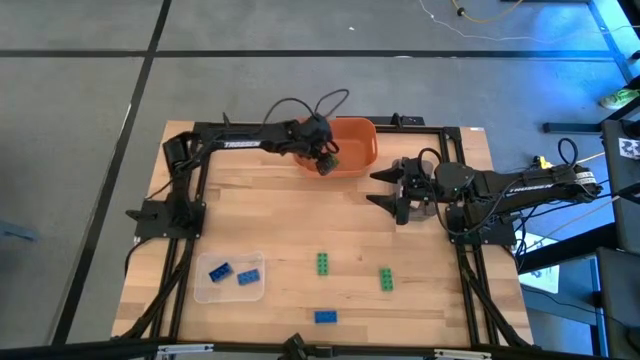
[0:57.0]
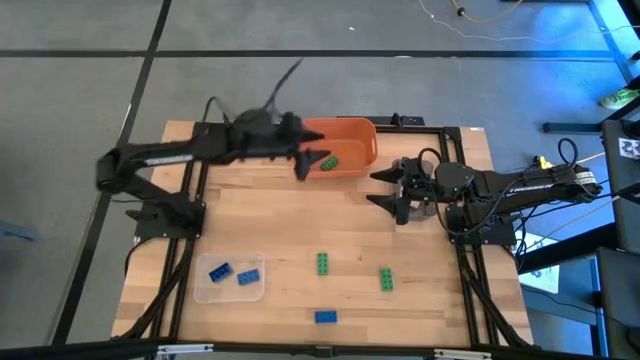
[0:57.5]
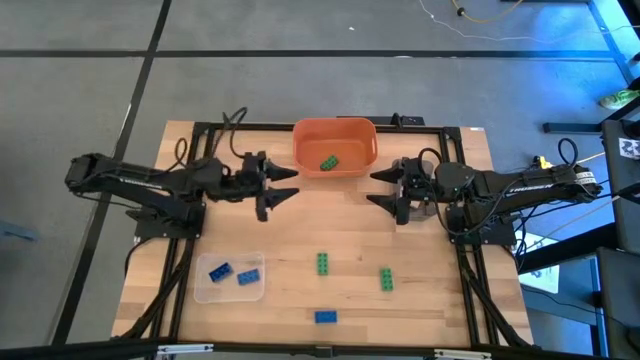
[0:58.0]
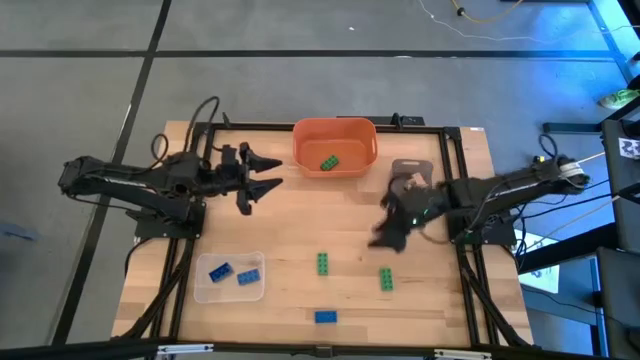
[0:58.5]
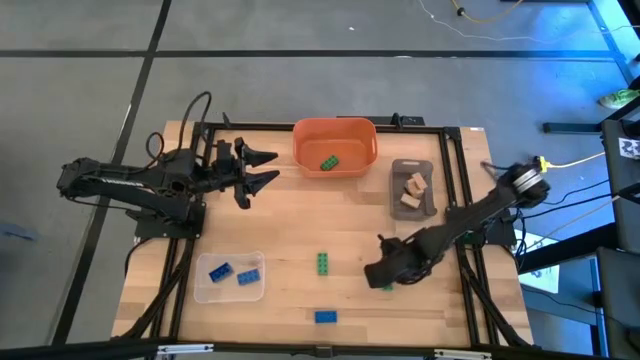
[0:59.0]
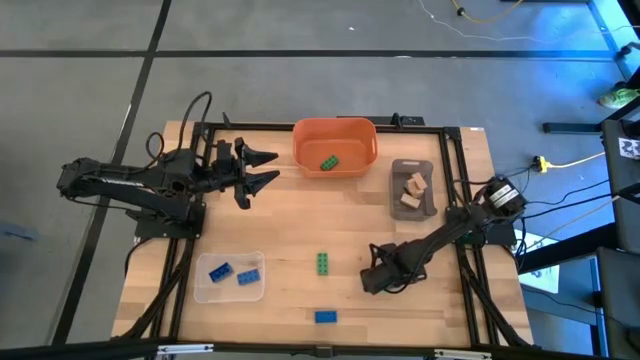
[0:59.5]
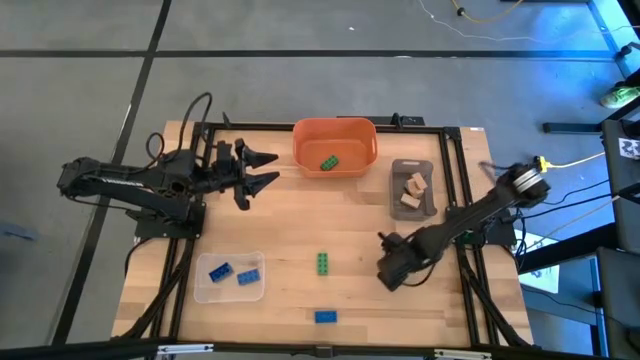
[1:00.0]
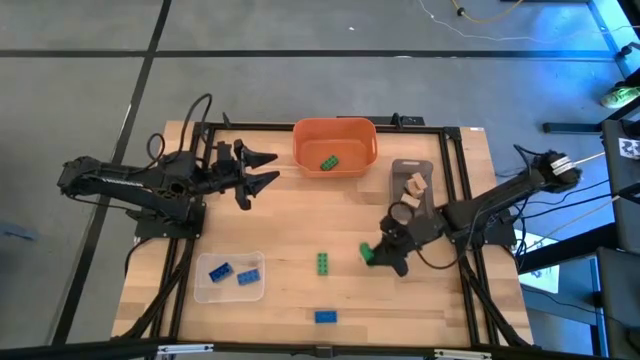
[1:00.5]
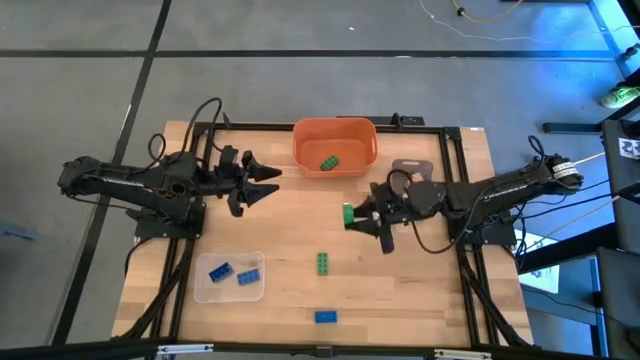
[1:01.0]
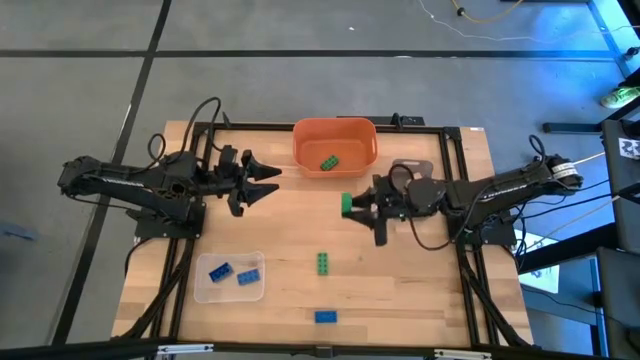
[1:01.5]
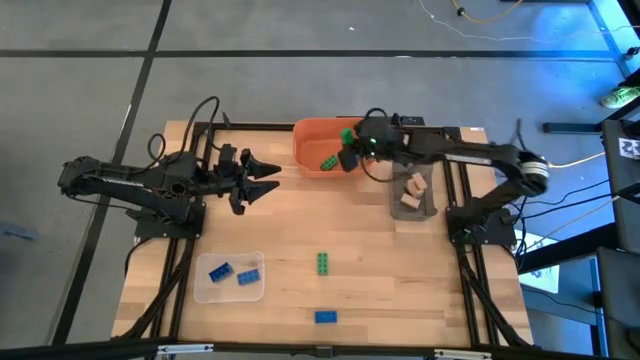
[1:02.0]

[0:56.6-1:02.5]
Task: Sort & place blocks by color
Put the right green 8 stud game piece into the orange bin

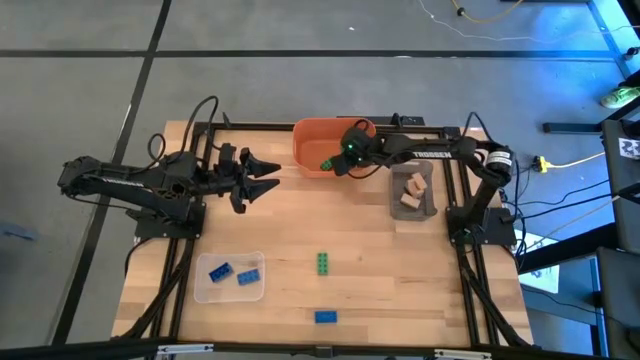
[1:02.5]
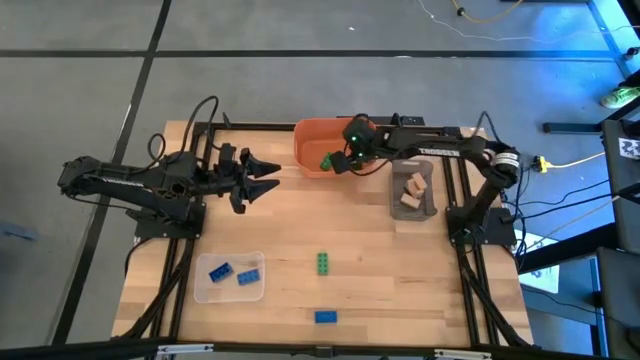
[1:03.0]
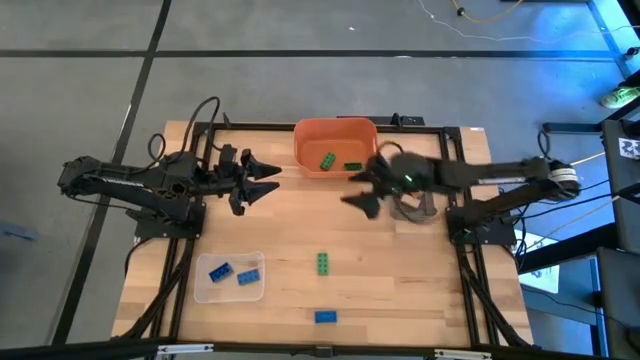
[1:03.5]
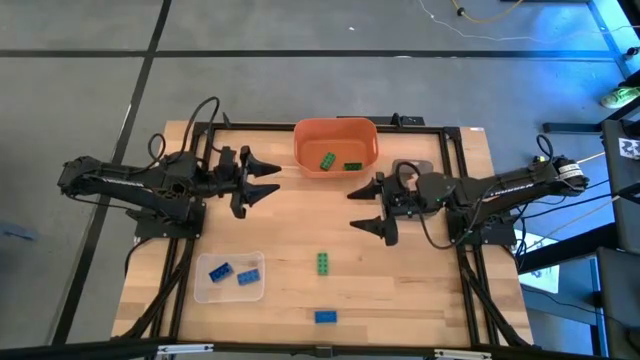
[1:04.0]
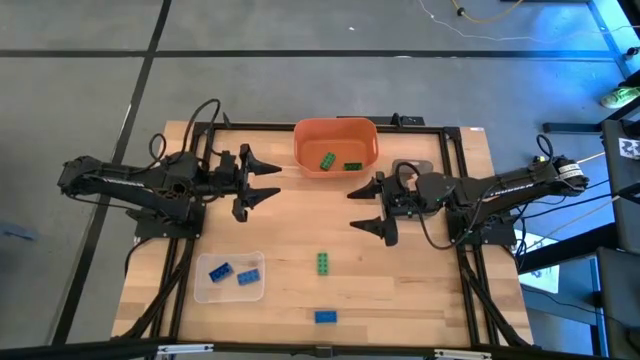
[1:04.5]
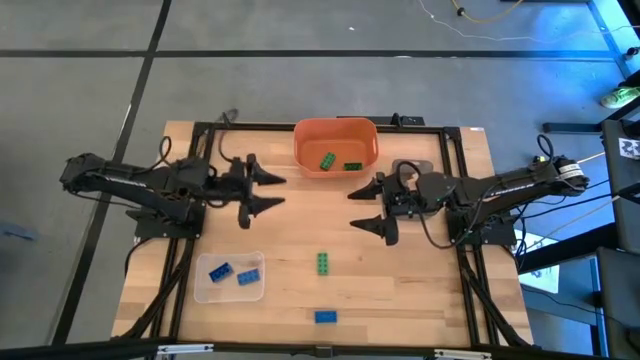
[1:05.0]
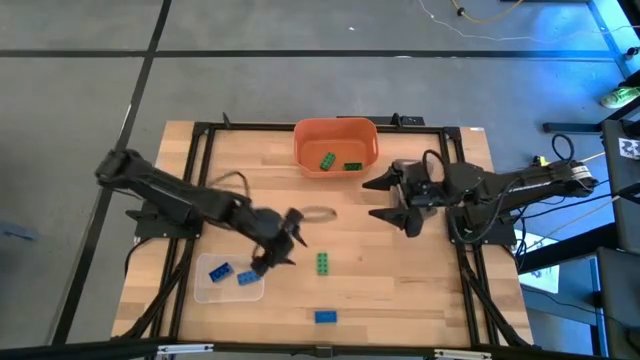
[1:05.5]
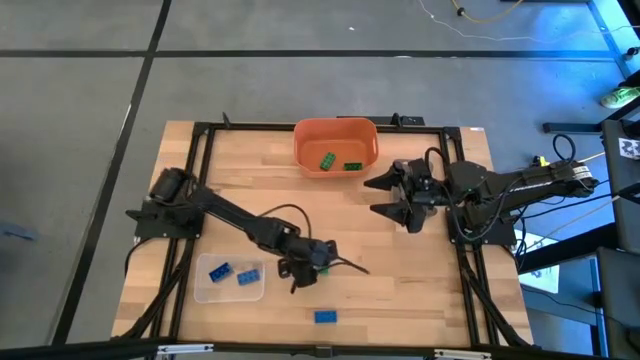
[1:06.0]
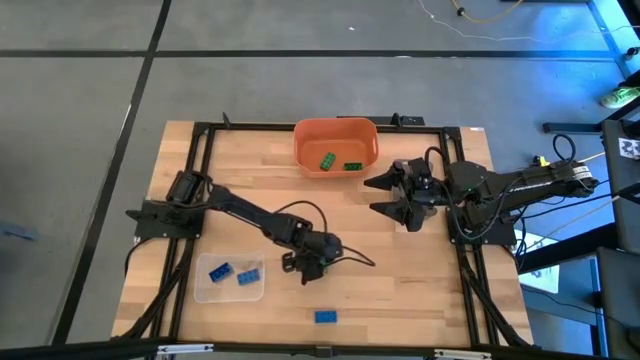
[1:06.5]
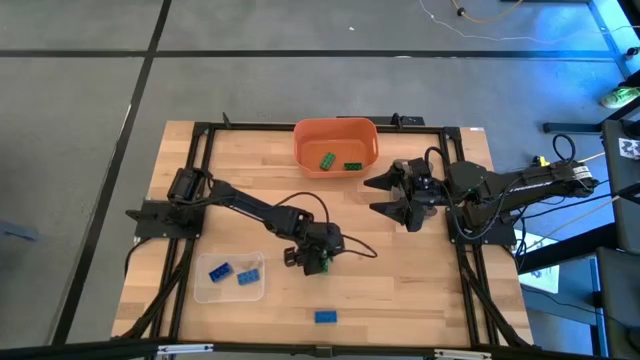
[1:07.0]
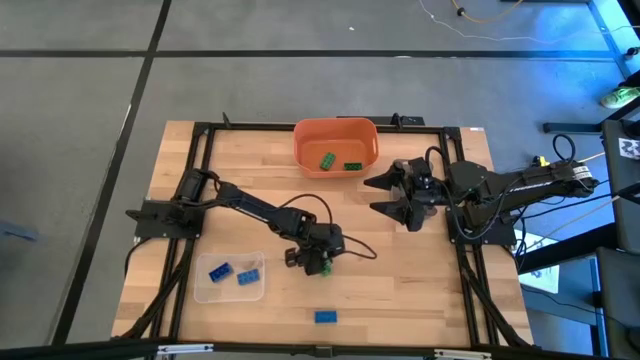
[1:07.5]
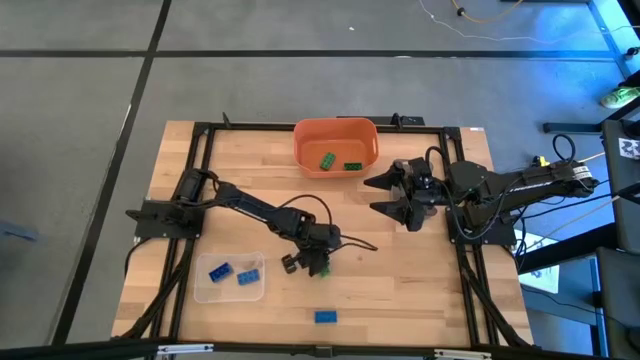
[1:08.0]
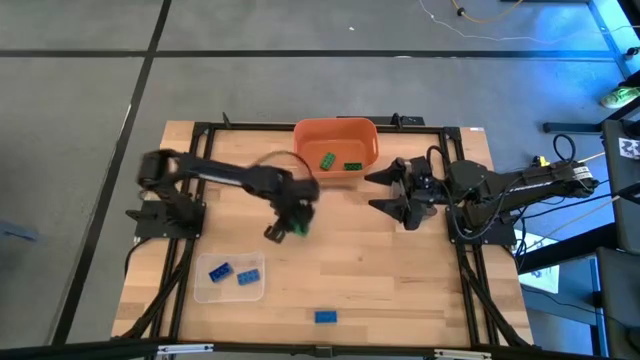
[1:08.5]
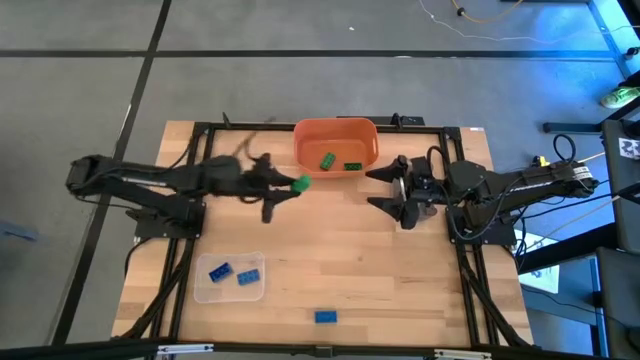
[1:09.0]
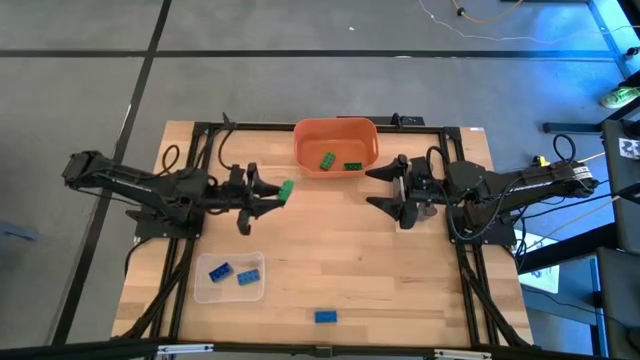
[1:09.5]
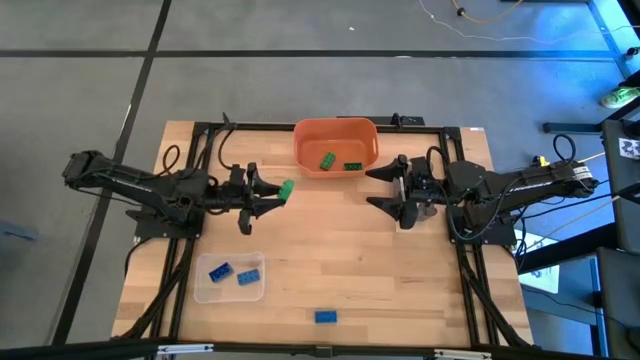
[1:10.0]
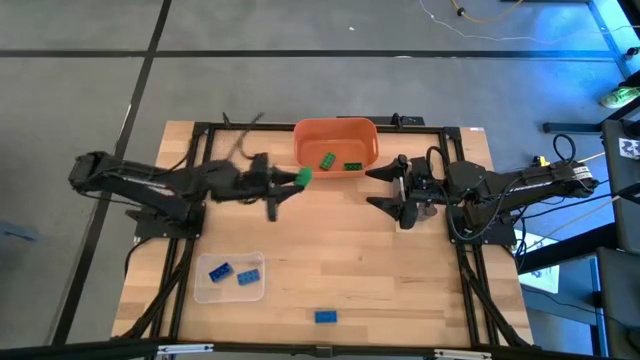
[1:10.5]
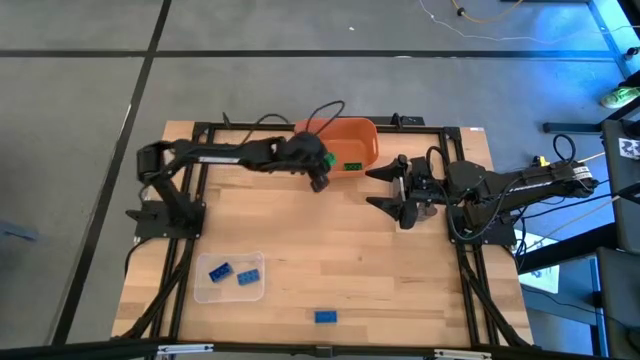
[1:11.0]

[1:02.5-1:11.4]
Put the green 8 stud game piece into the orange bin

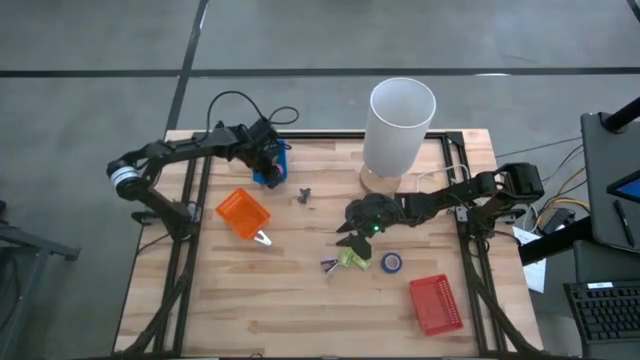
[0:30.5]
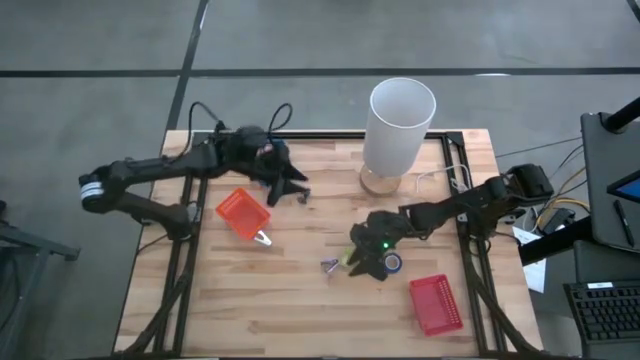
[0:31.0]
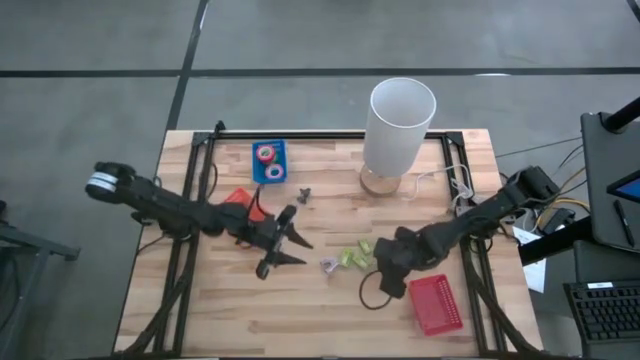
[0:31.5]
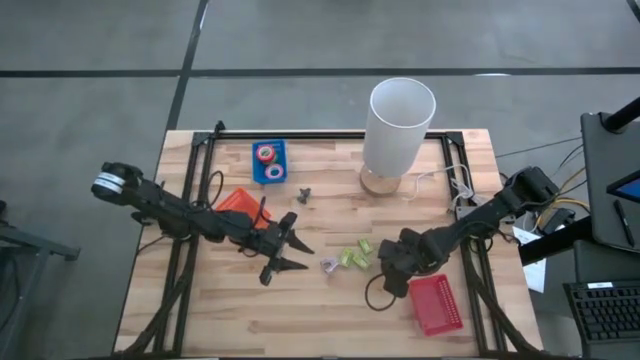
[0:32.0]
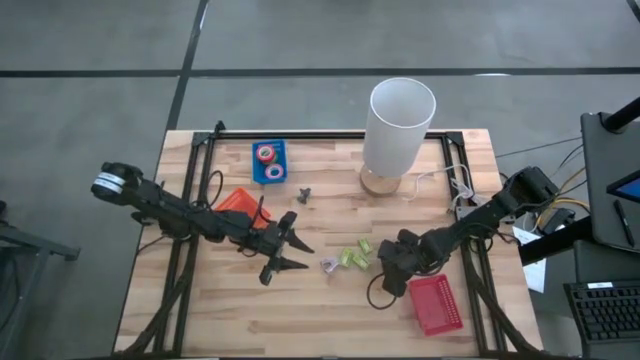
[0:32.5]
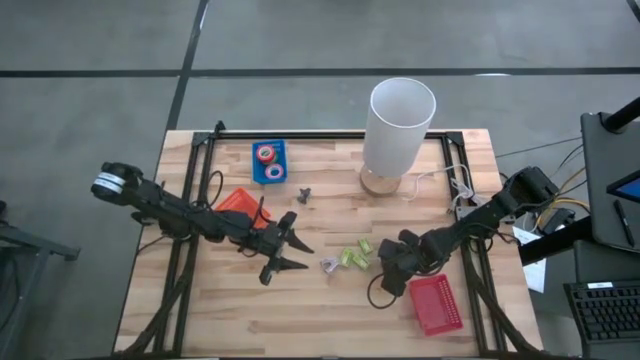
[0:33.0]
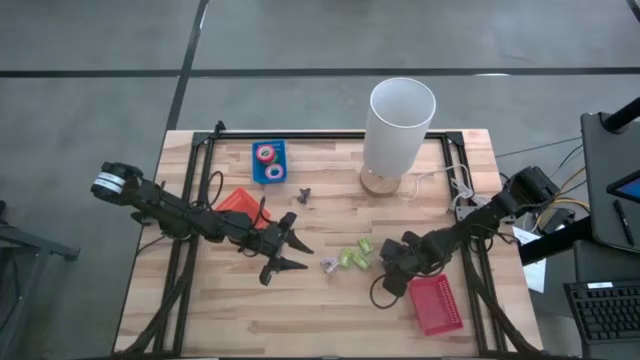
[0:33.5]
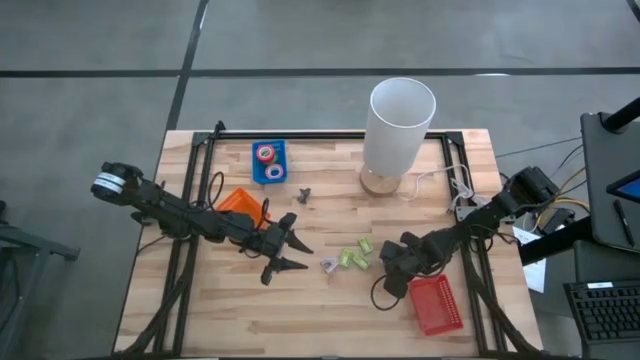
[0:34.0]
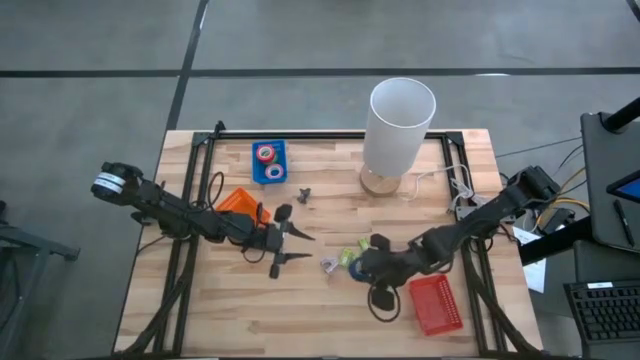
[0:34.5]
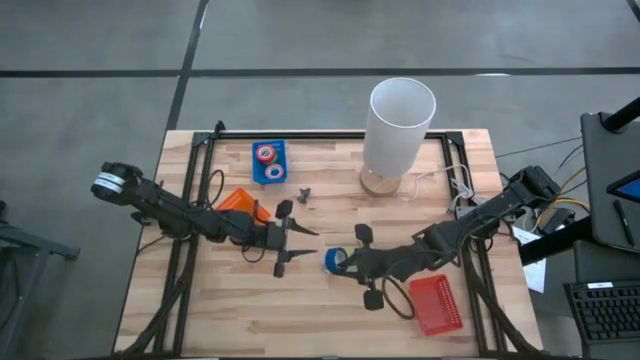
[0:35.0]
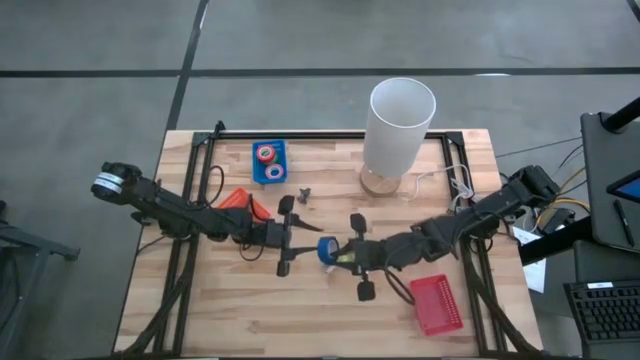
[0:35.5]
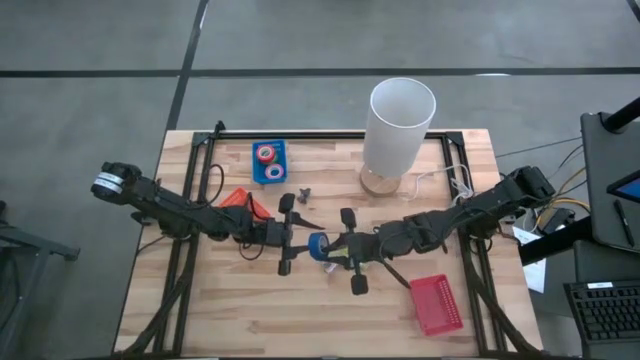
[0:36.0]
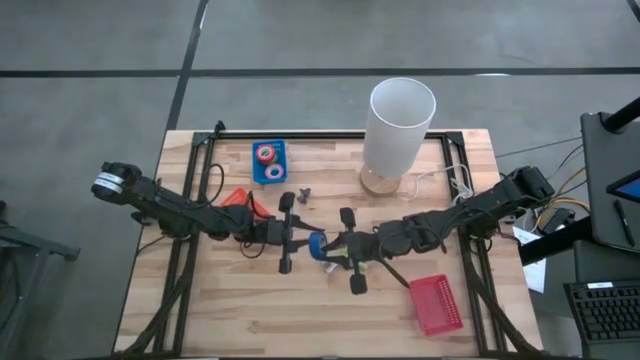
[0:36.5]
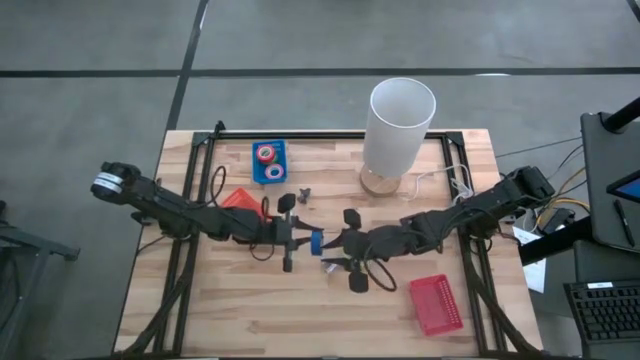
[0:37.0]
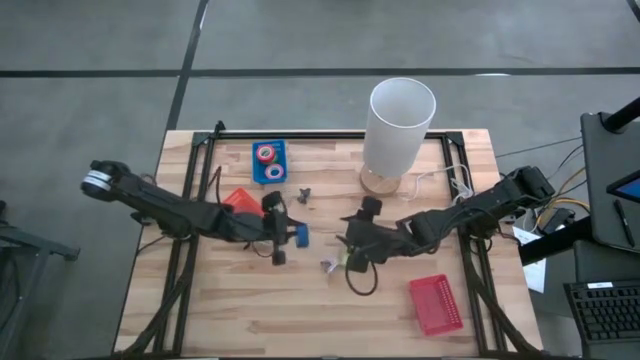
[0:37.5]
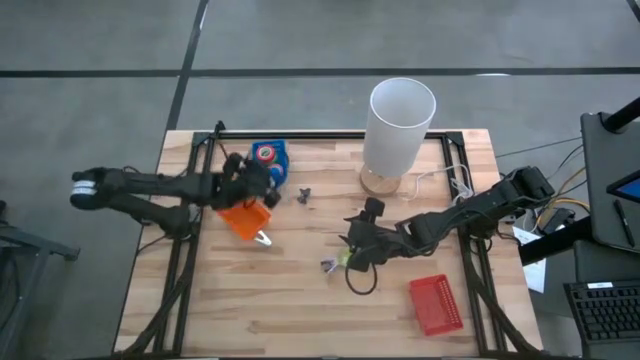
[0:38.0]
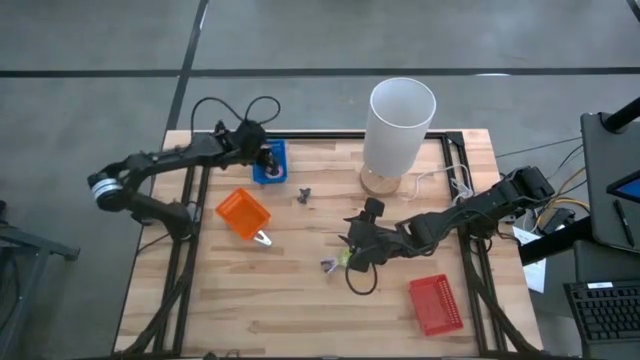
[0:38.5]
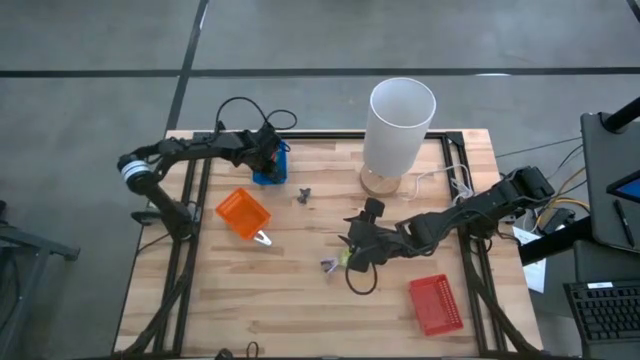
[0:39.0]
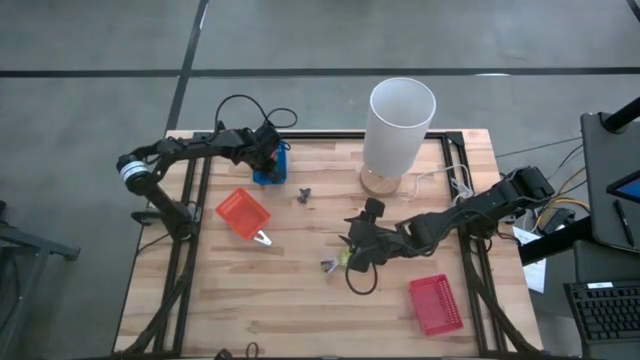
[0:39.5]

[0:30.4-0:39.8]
Task: Pick and place Stapler, Stapler remover, tape
Stack the blue tape on top of the pink tape into the blue bin
